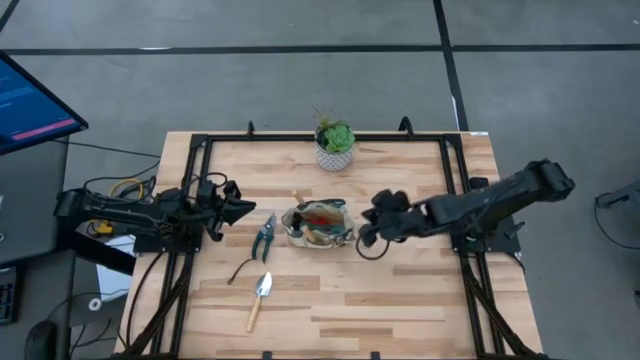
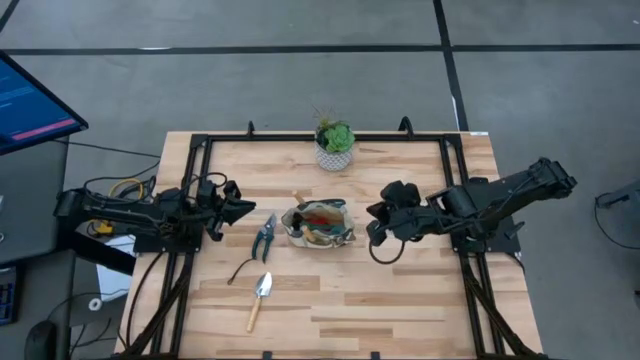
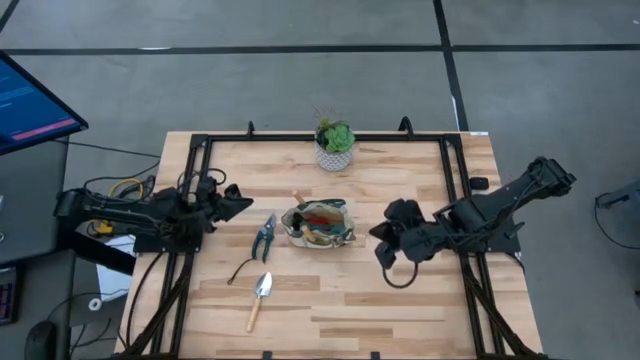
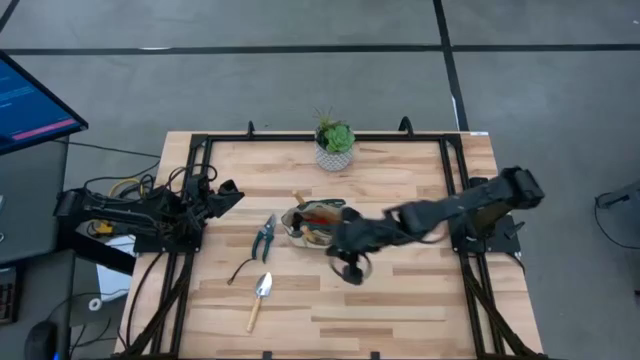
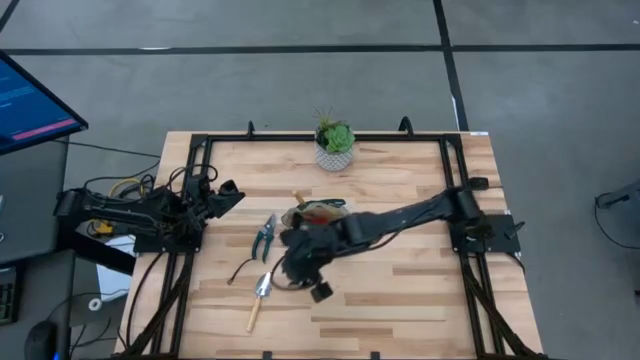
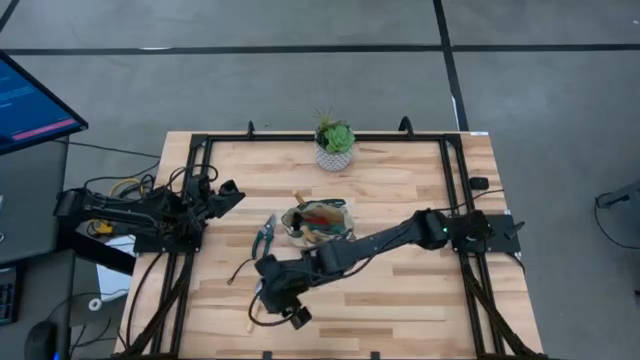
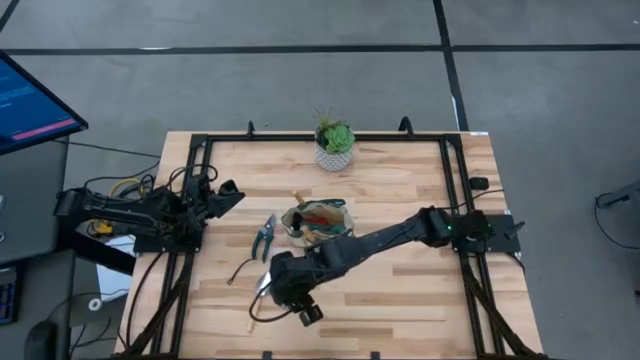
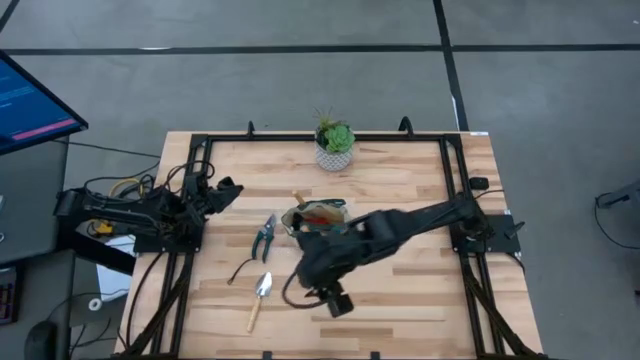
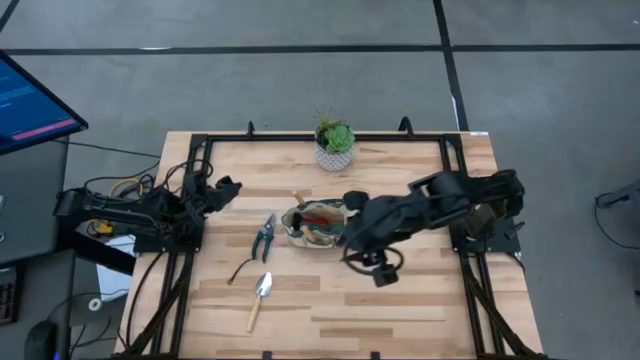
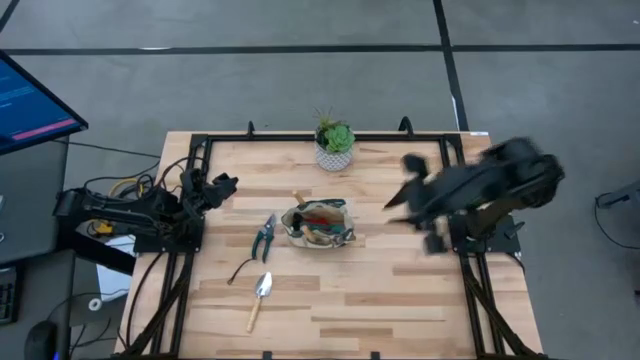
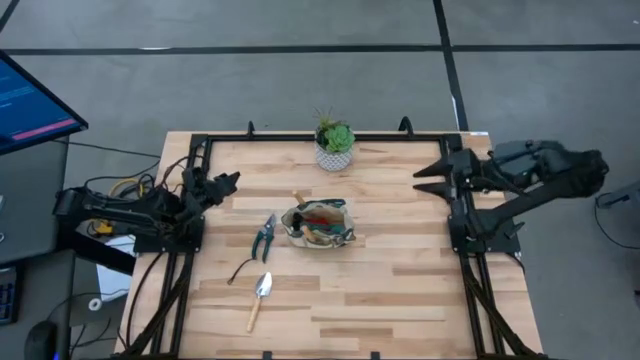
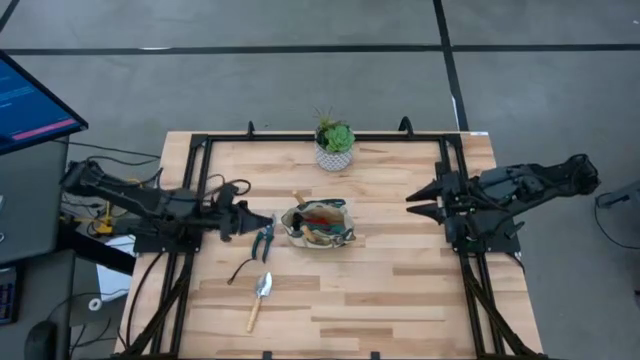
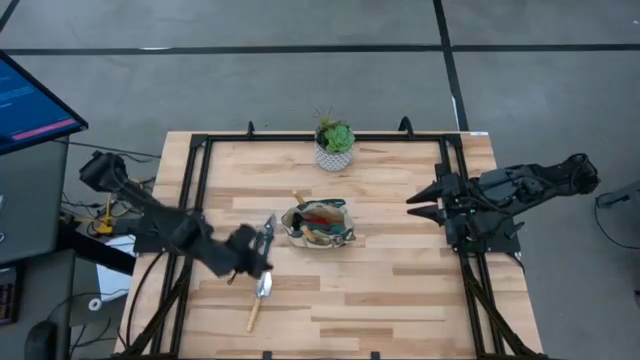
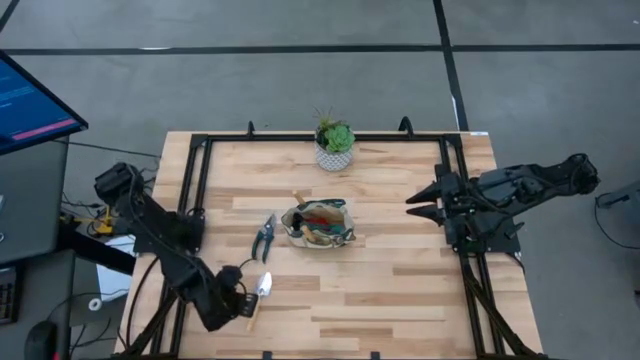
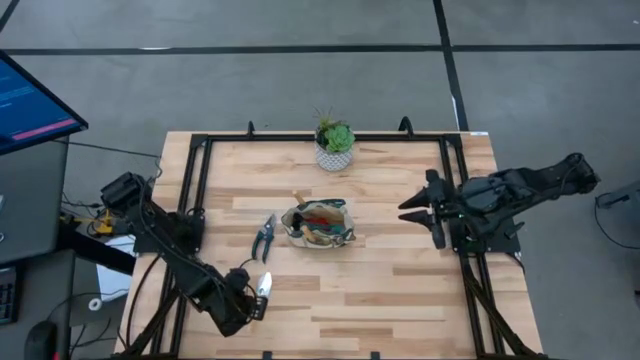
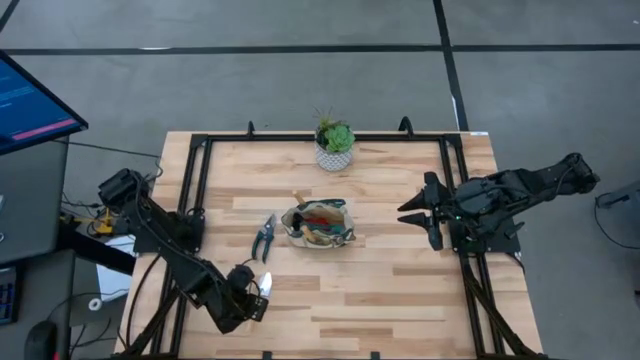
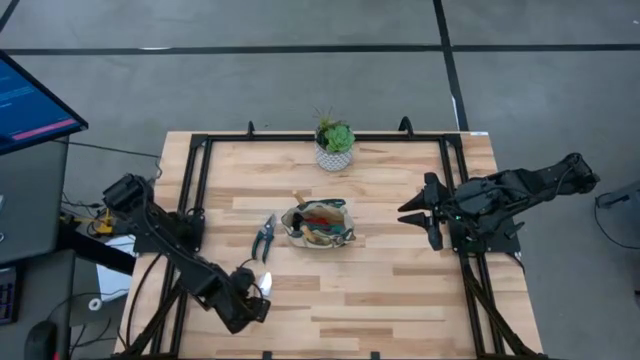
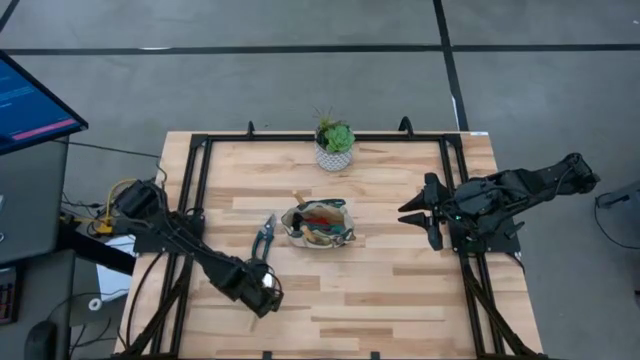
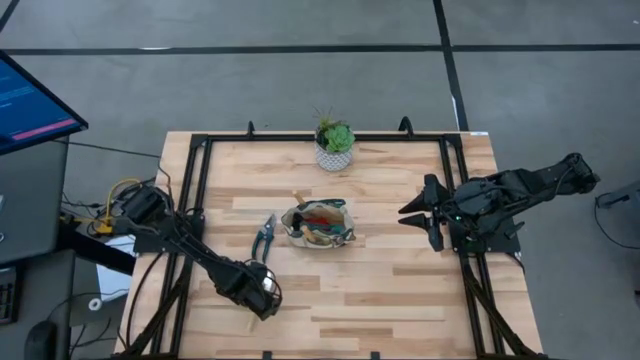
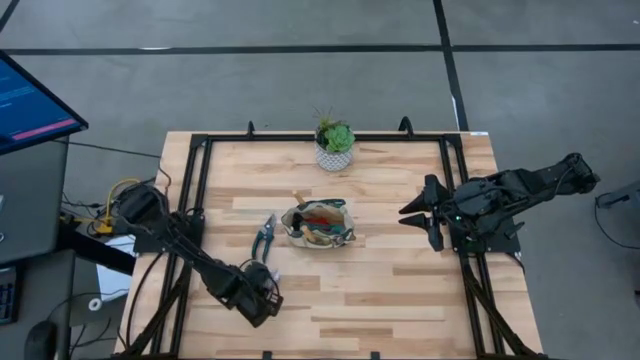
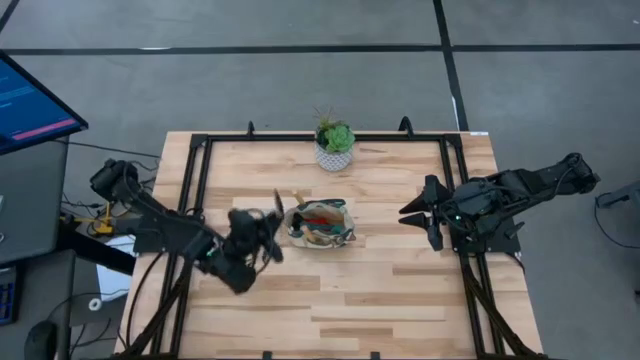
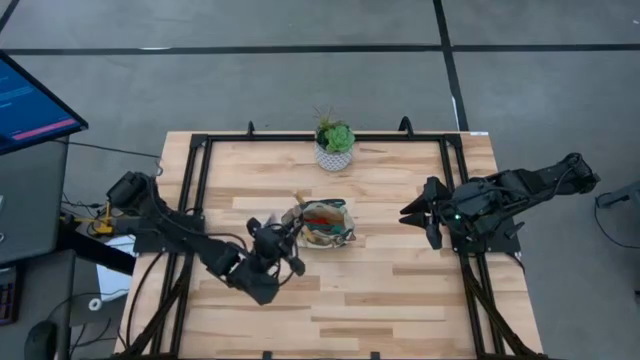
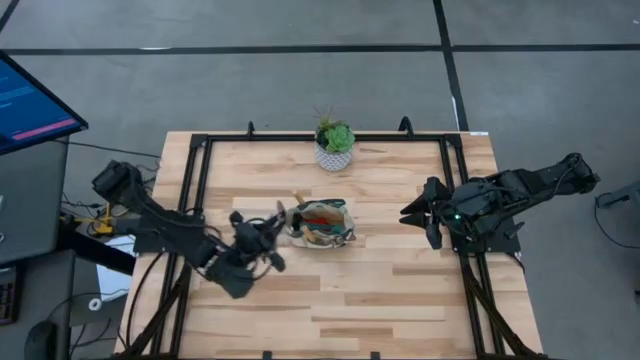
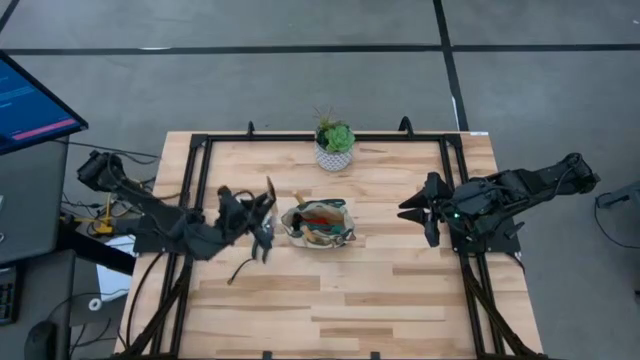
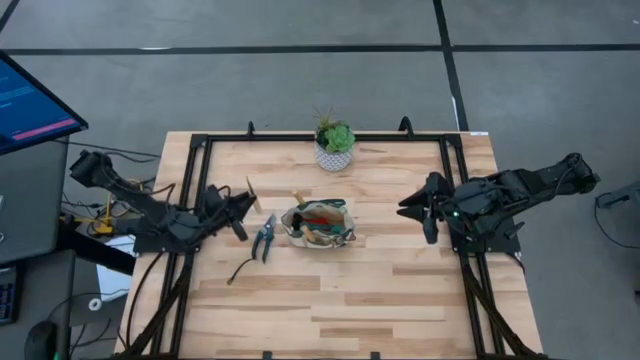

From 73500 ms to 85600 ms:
Task: Pick & Place Garden tools in Gardening bag
Put the trowel into the gardening bag

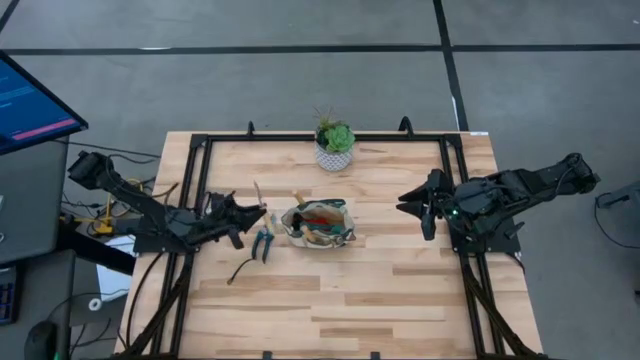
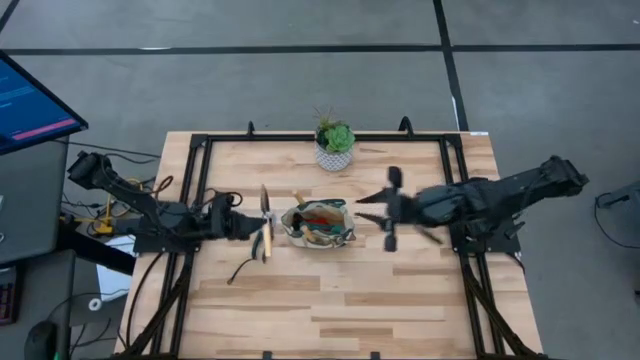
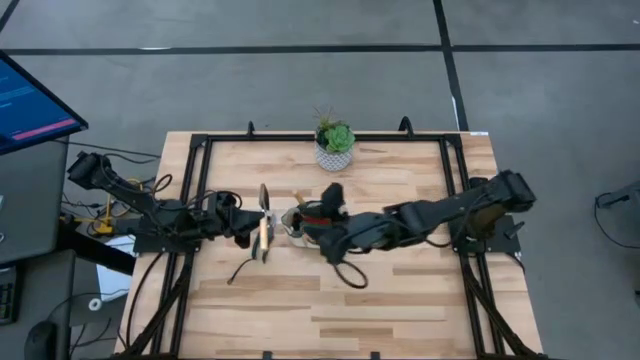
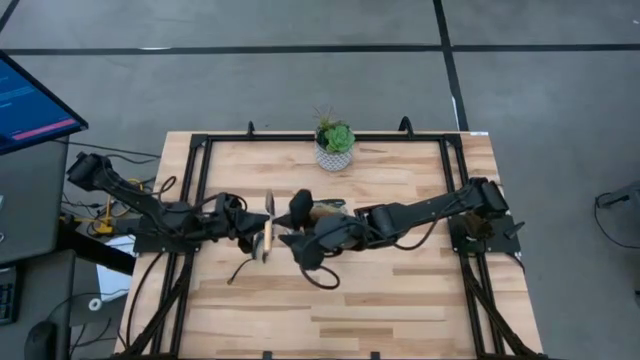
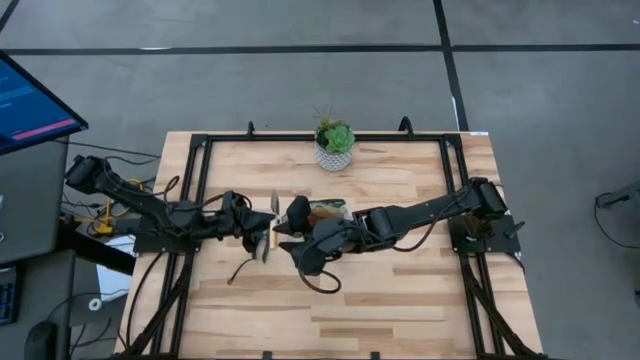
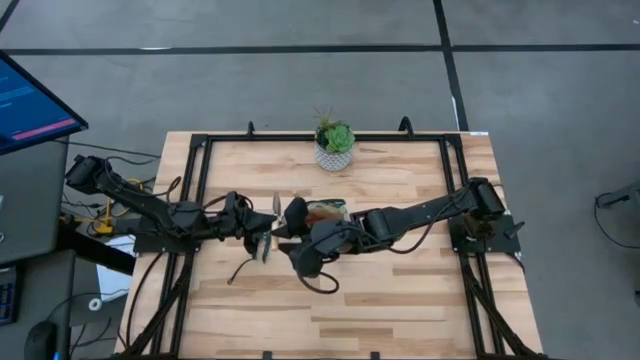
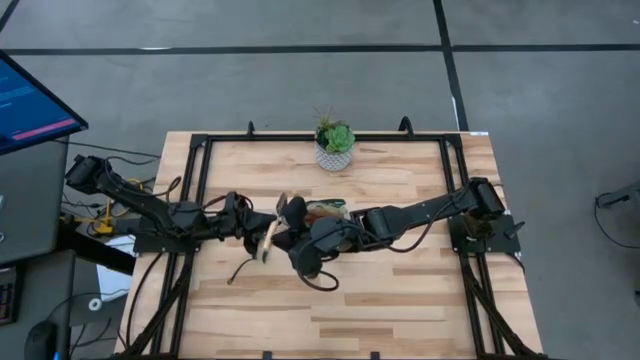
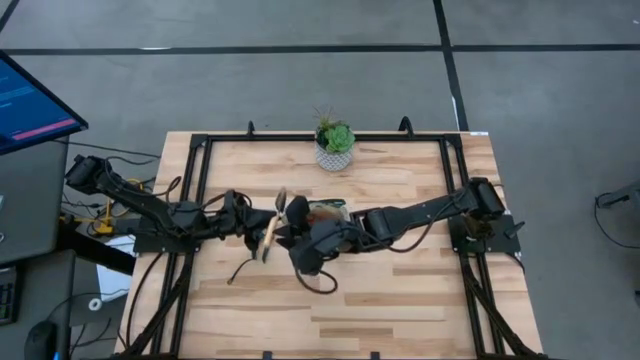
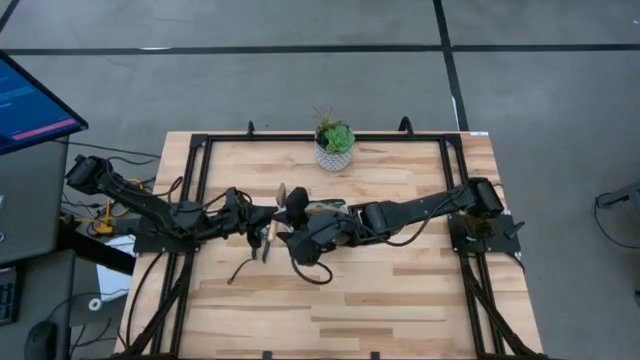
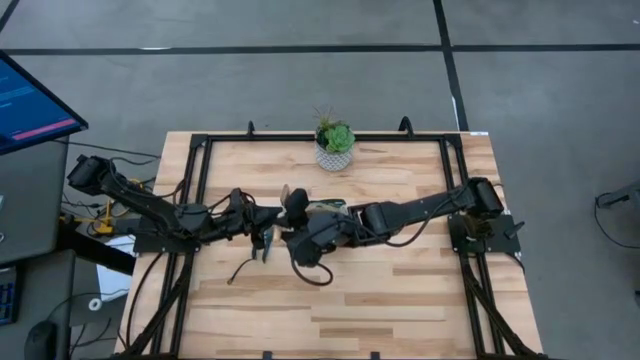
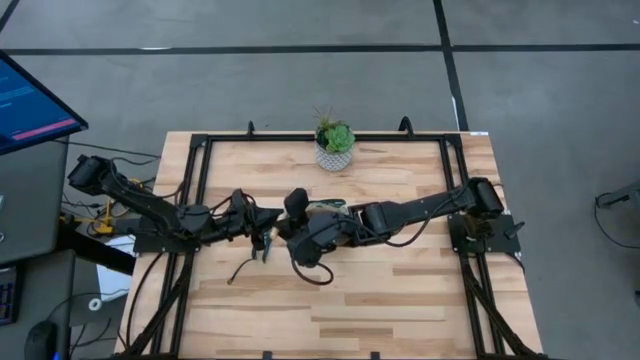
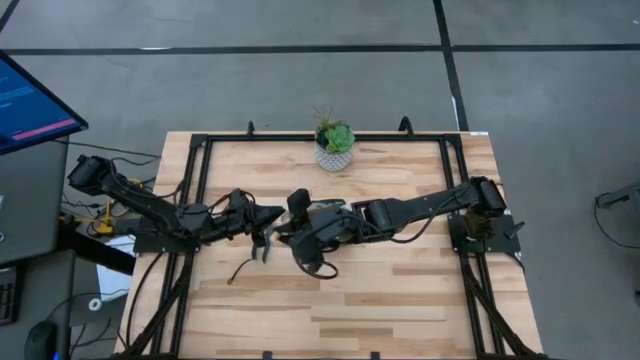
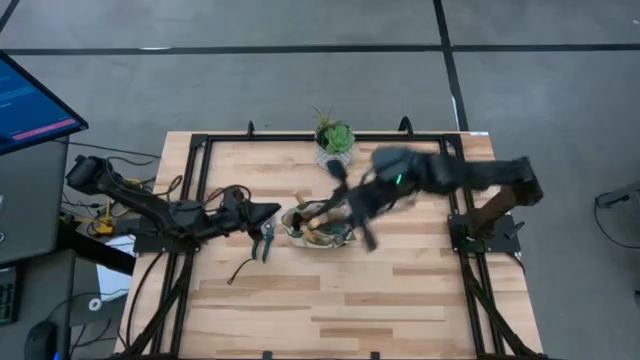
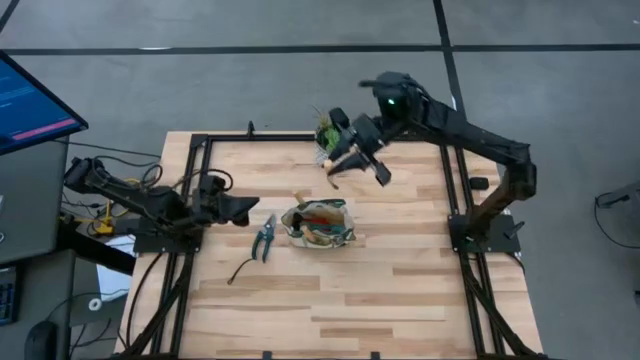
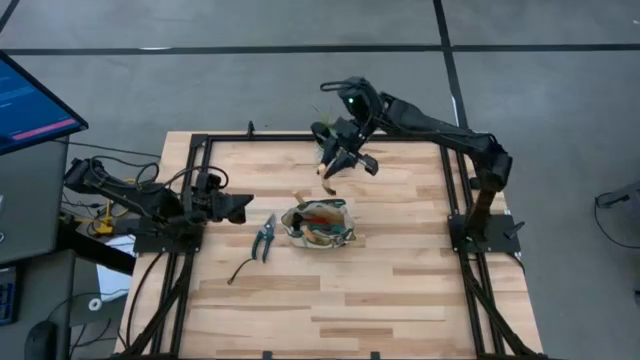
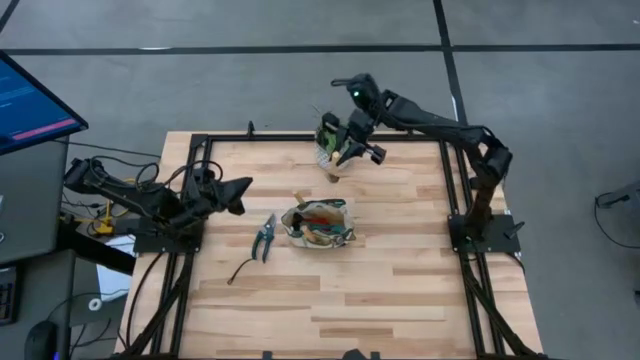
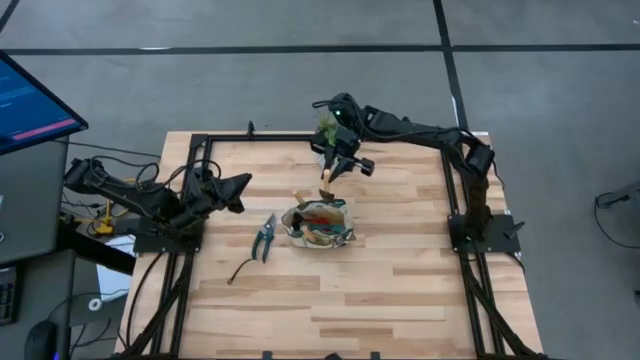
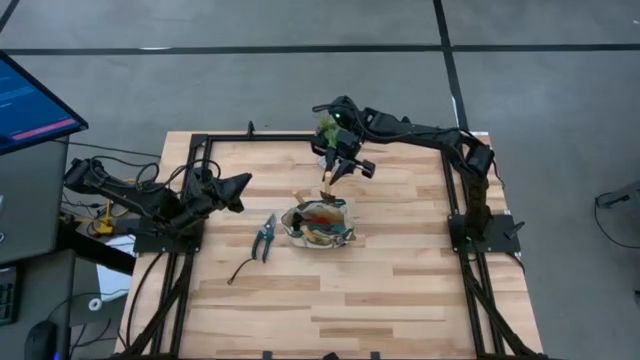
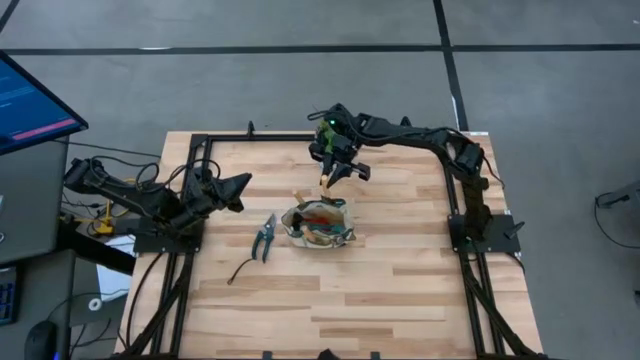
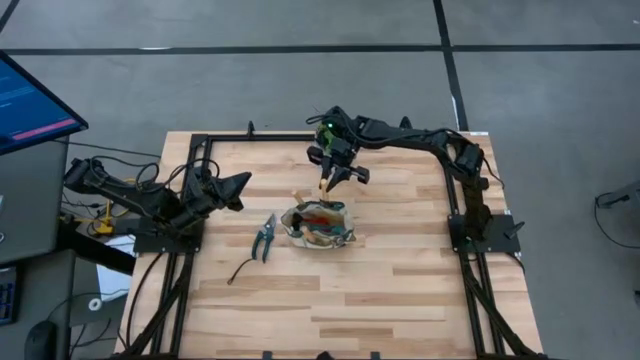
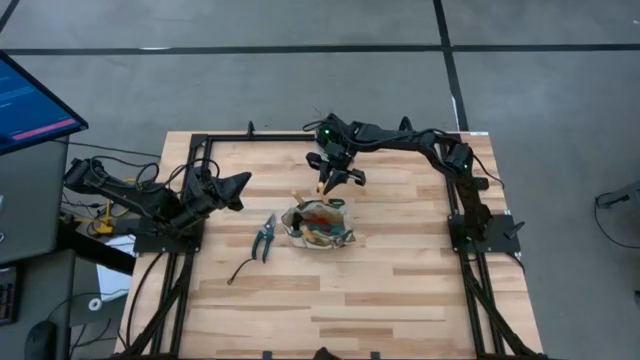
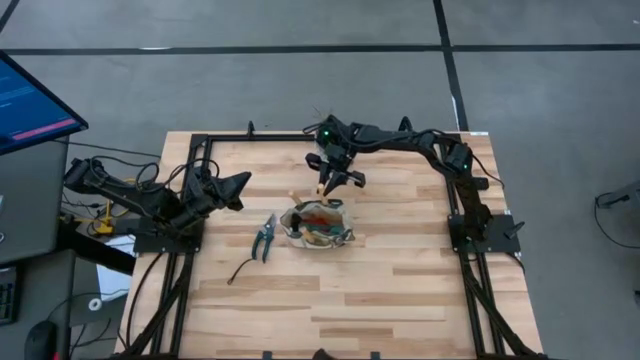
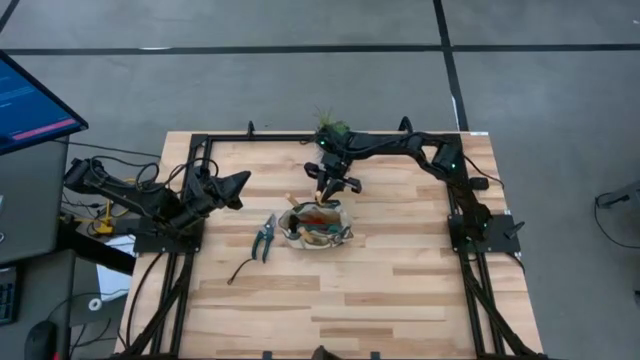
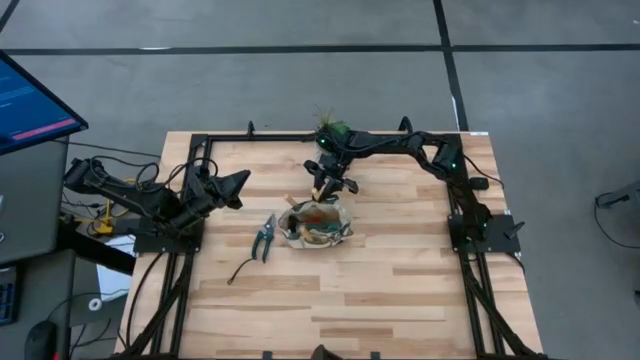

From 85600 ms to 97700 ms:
Put the trowel into the gardening bag
